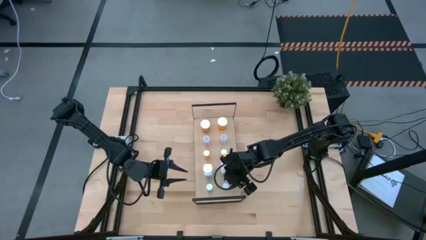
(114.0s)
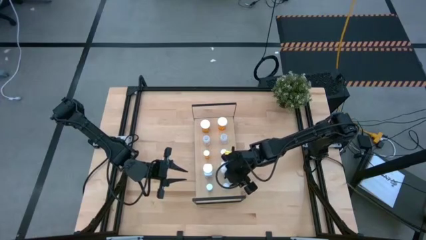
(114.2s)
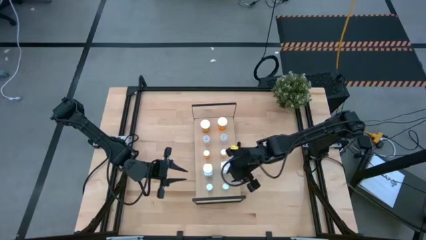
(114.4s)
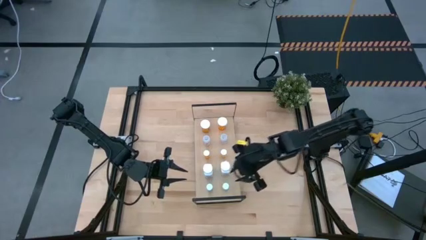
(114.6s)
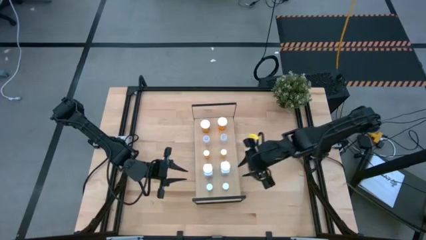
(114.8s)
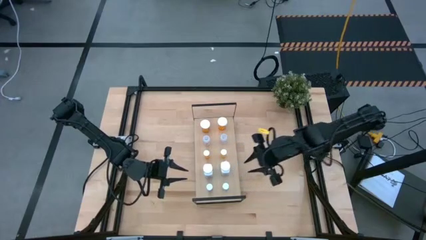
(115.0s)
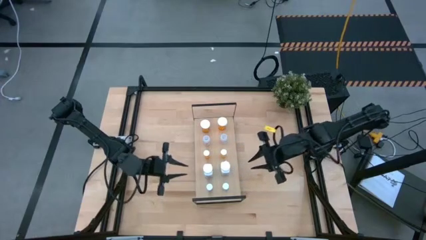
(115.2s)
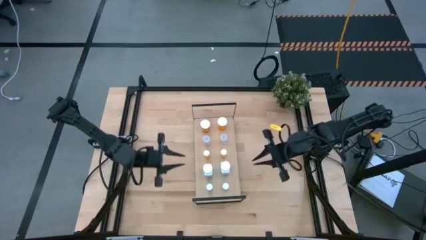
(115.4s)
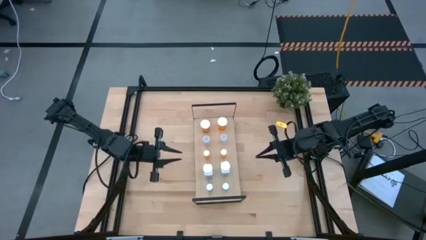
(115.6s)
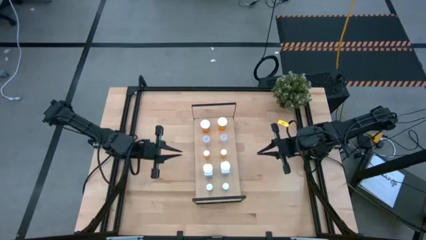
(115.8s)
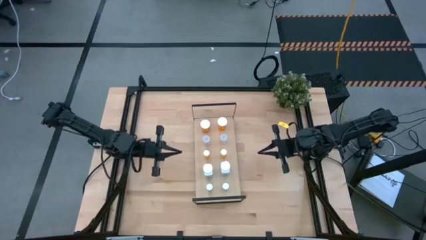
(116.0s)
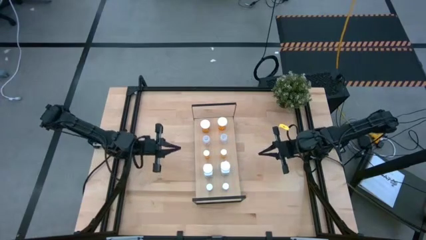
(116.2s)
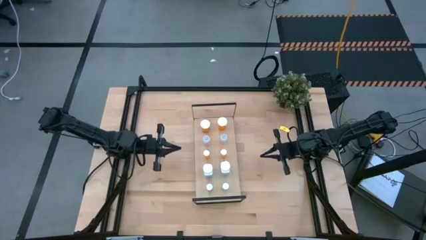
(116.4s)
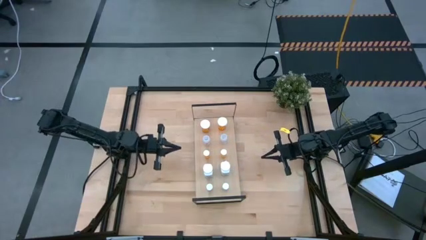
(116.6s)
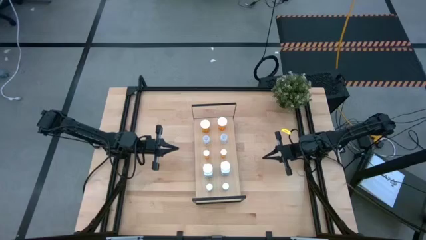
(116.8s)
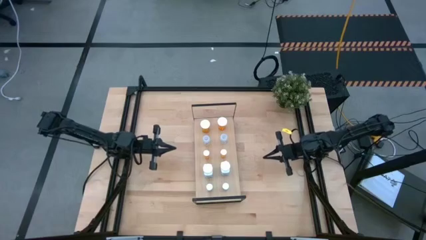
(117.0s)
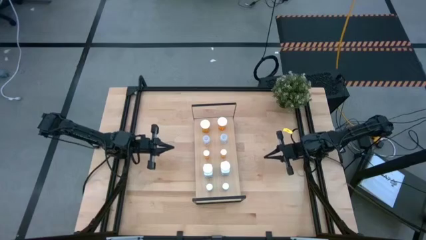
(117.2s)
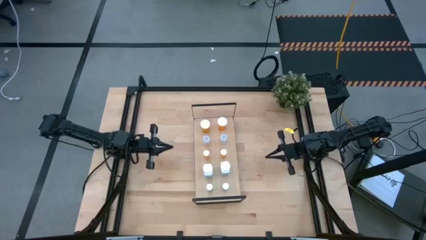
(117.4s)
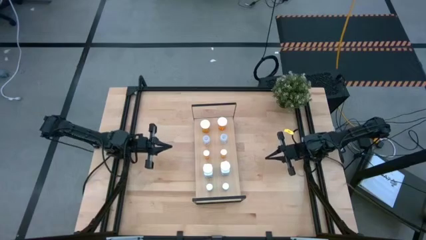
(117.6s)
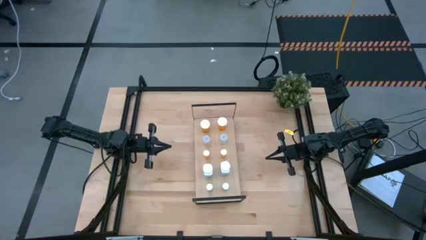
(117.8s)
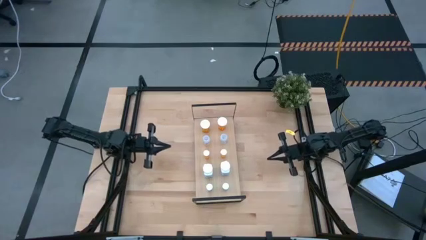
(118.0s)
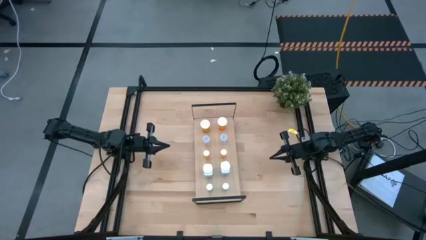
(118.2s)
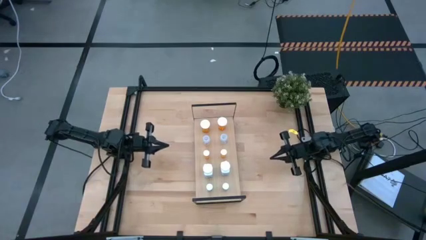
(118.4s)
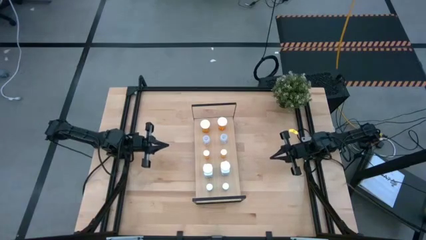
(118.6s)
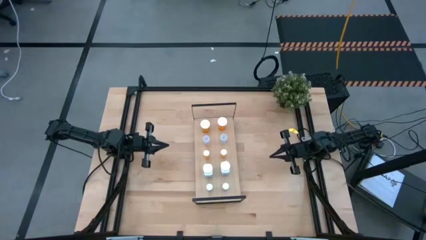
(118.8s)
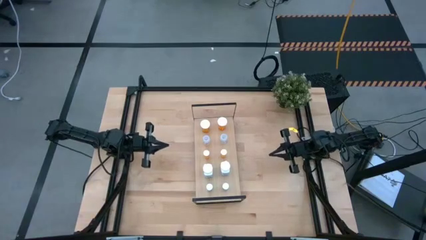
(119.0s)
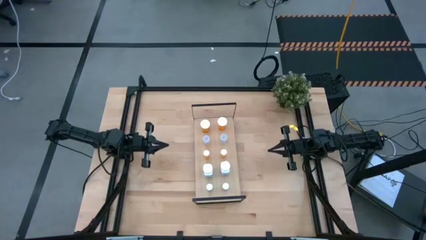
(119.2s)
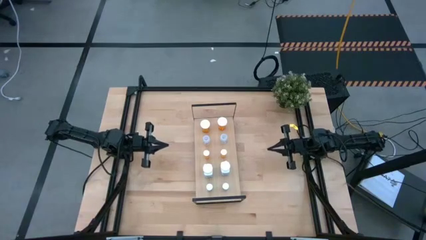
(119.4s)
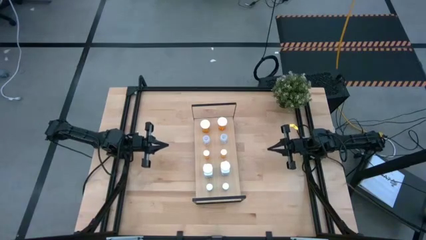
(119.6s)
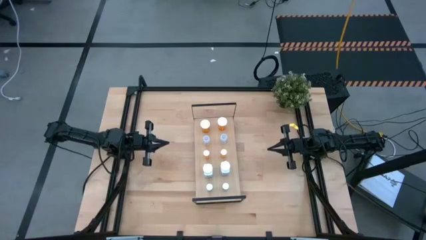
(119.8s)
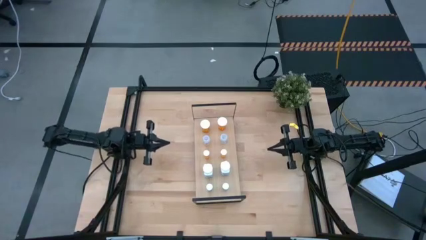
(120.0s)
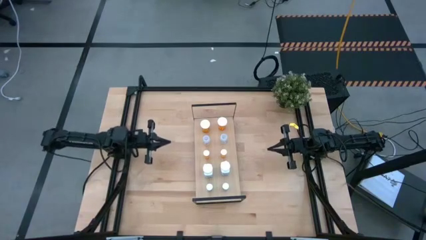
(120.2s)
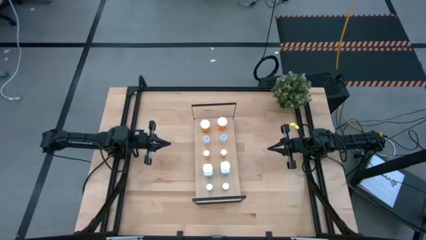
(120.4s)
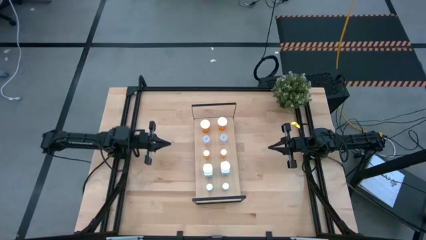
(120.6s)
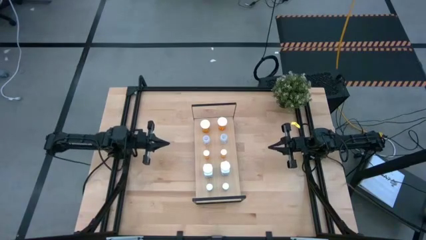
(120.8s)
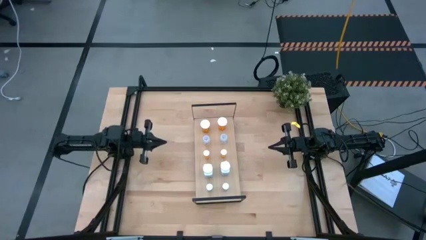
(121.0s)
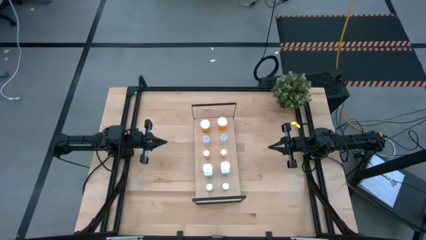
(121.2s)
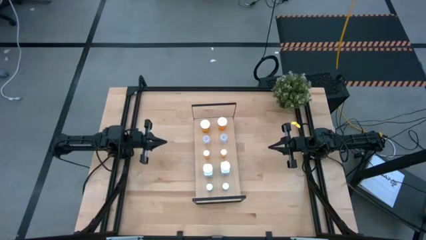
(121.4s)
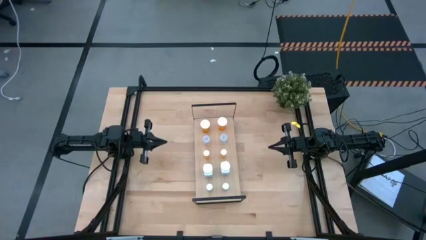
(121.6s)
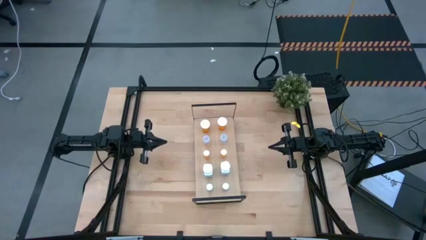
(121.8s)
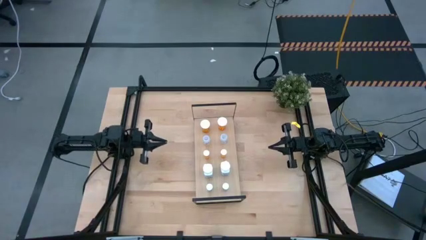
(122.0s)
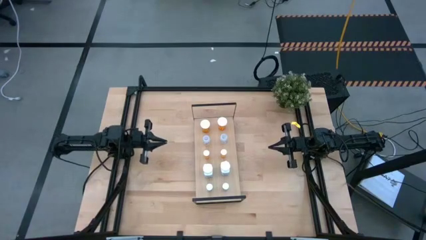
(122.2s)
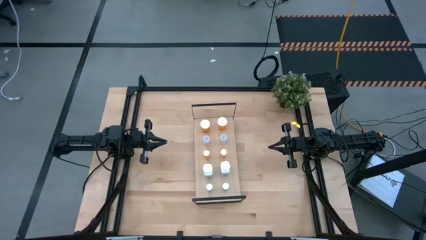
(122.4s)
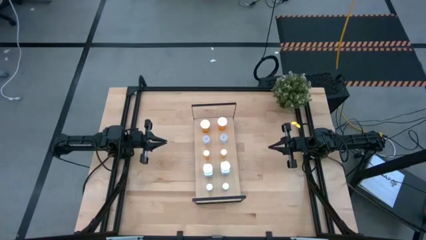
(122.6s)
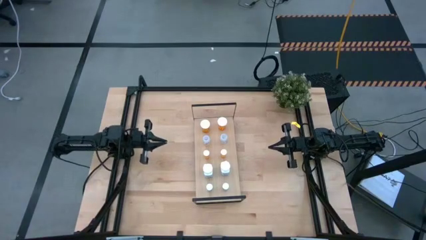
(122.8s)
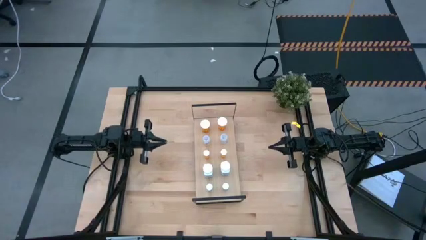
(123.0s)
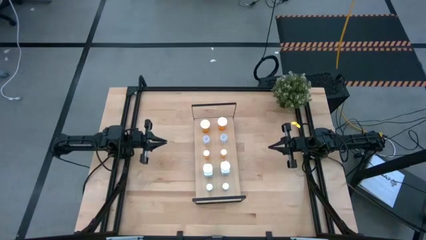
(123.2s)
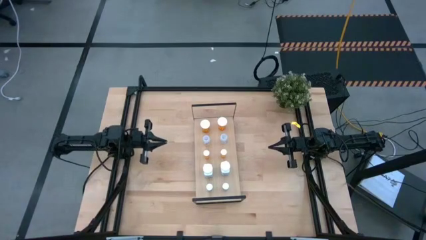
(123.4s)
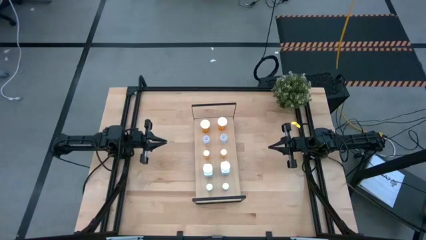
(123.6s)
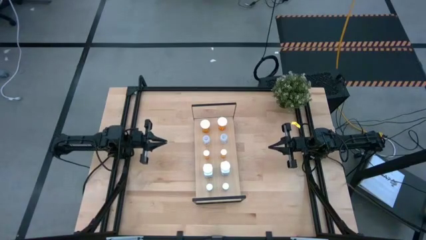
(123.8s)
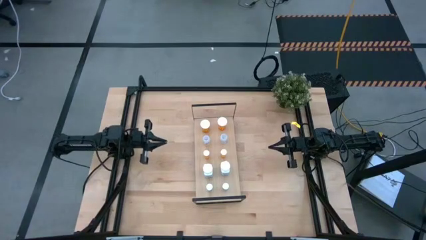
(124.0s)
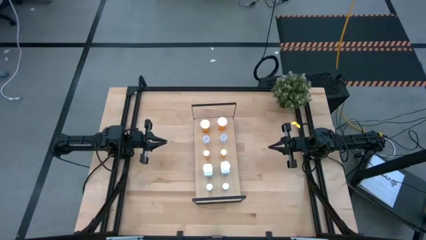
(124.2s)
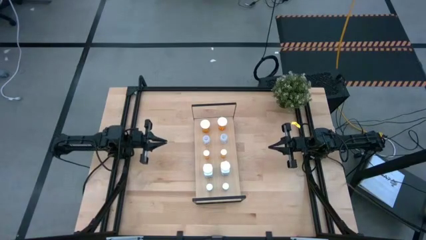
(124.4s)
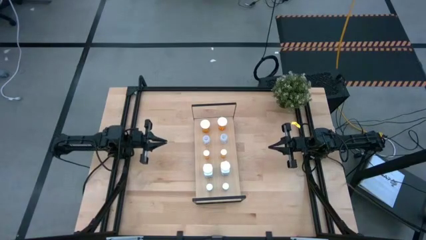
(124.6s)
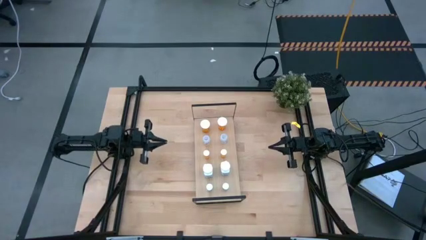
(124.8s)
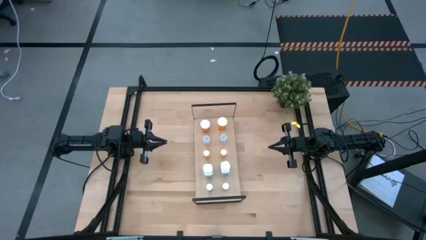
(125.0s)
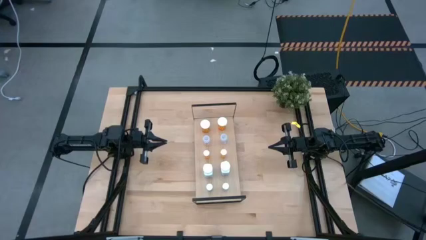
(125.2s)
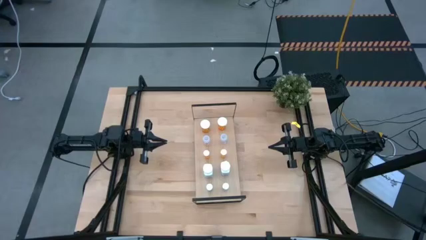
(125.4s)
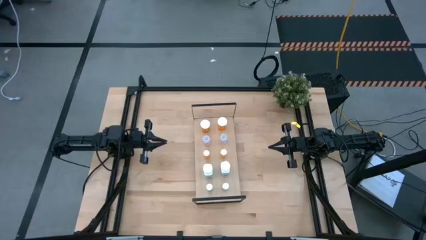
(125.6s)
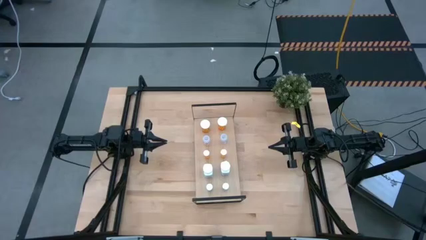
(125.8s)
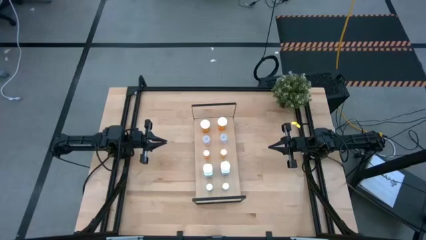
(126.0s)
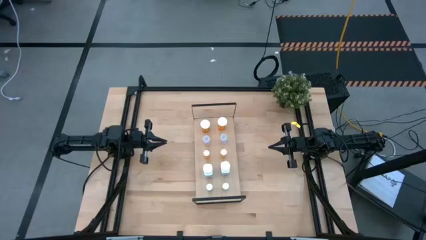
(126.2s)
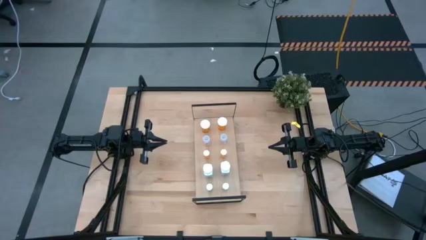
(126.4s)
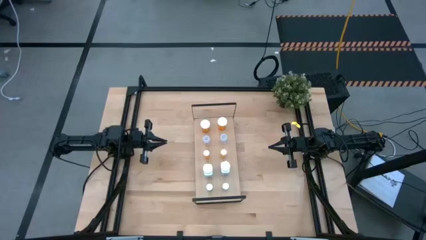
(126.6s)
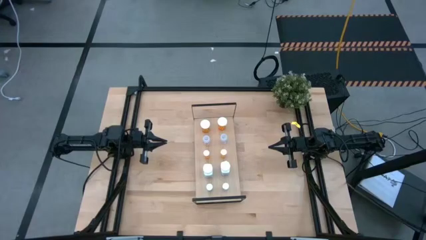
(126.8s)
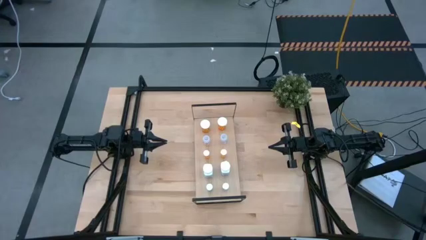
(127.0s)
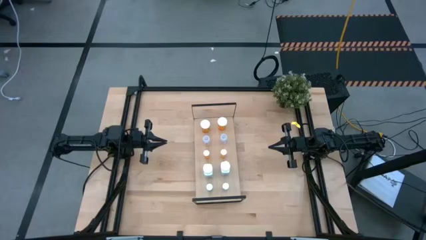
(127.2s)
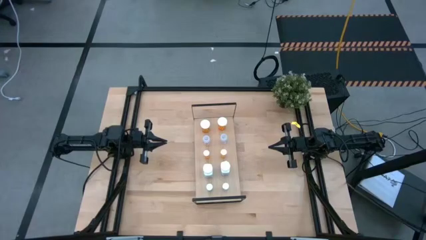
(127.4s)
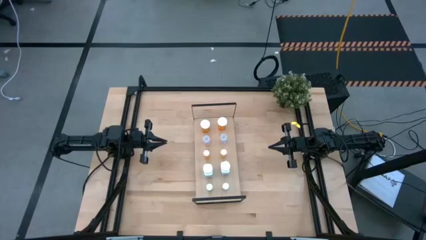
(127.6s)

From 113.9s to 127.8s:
Task: Pick and place medicine bottles onto shelf by color
Return to Home Position

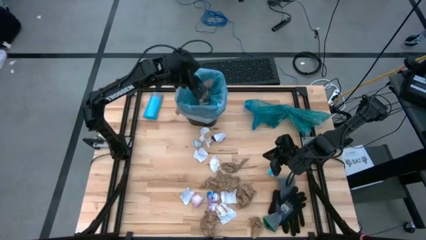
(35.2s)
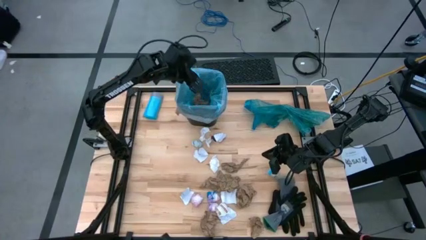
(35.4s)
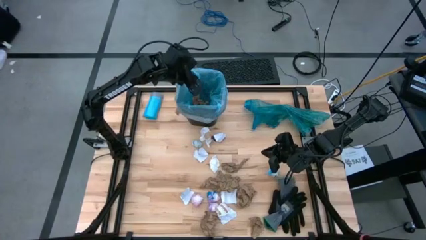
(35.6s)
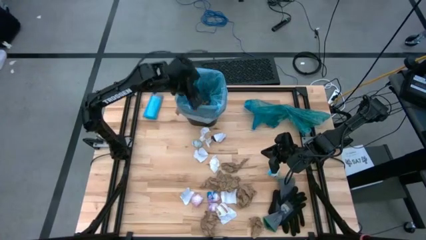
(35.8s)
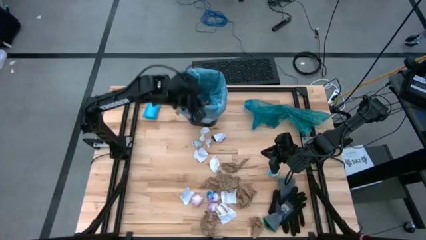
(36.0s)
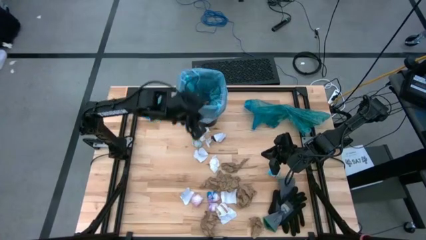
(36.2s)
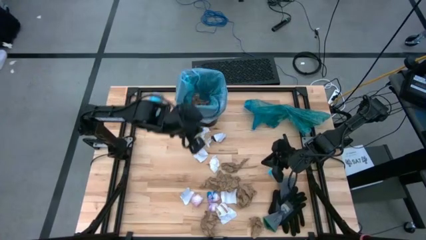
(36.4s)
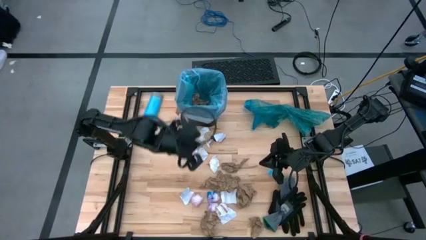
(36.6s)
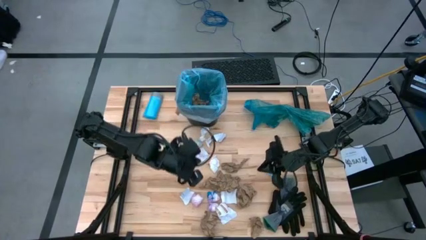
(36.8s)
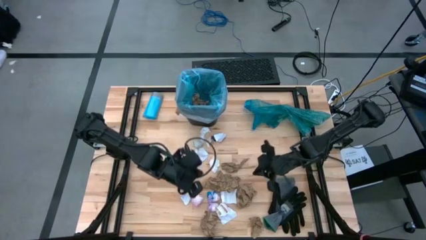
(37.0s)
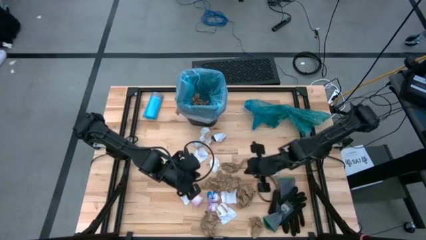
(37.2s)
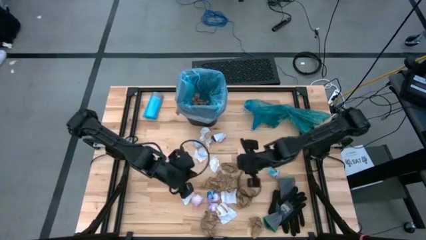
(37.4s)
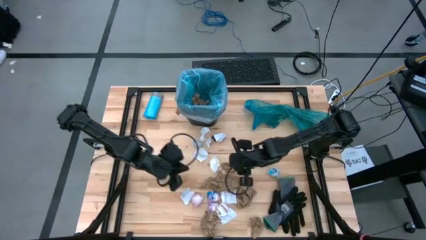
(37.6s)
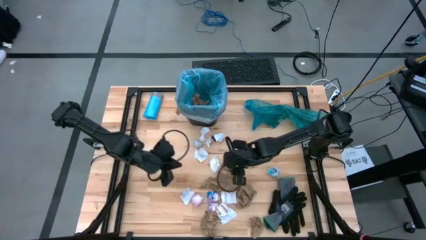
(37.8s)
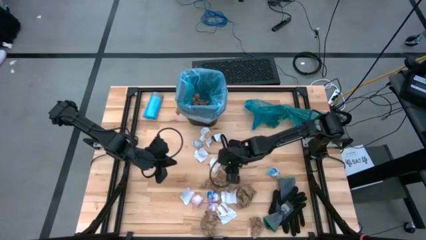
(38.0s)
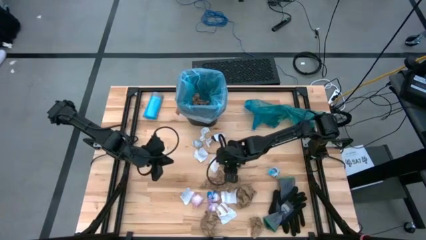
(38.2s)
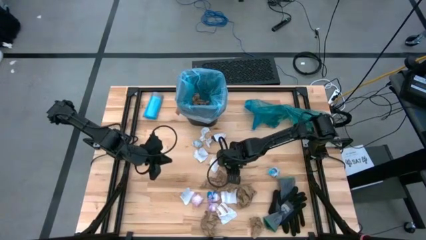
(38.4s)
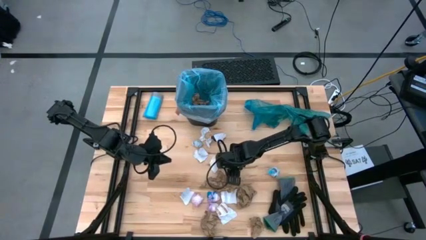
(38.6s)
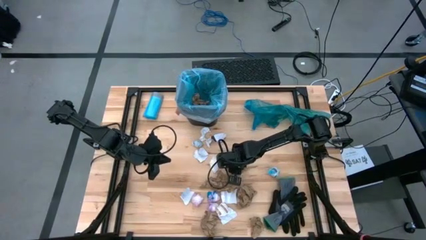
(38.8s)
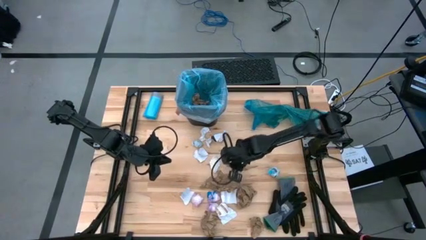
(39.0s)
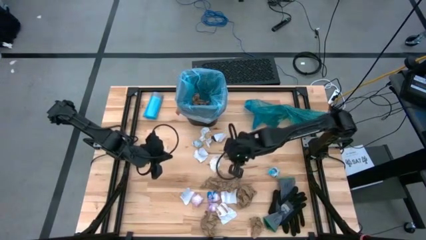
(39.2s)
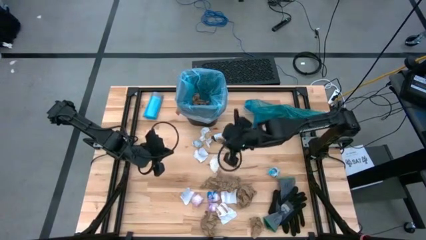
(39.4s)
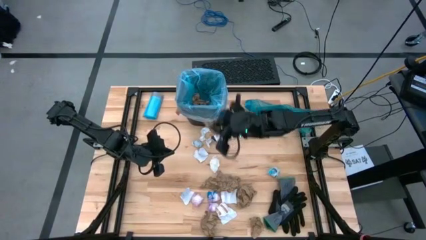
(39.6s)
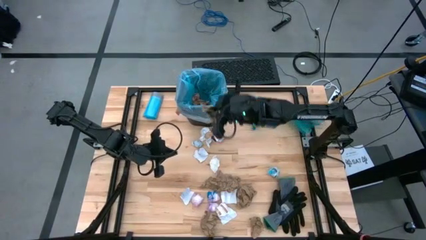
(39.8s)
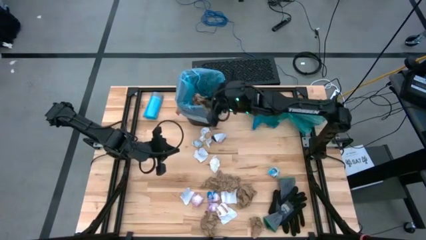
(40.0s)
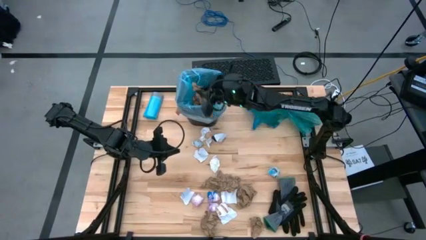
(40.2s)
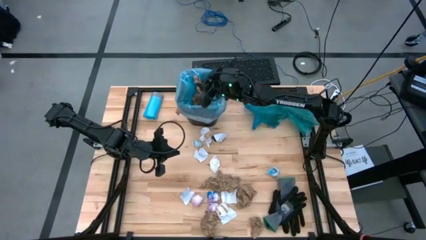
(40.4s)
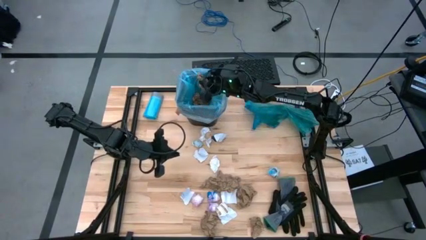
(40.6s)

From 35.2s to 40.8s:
Task: place trash/remove bag and relplace
Put the brown paper trash into the trash bin
